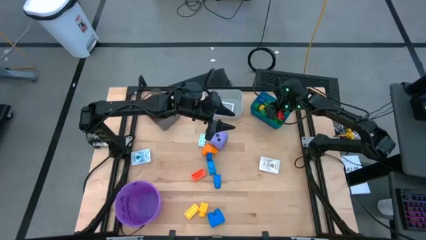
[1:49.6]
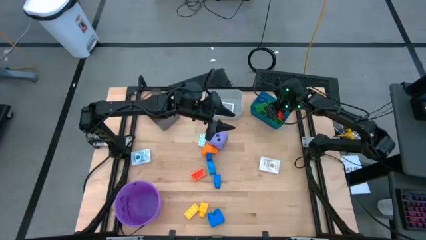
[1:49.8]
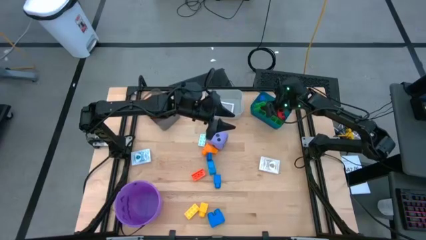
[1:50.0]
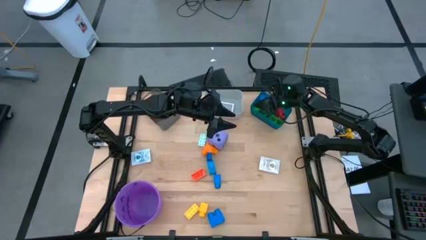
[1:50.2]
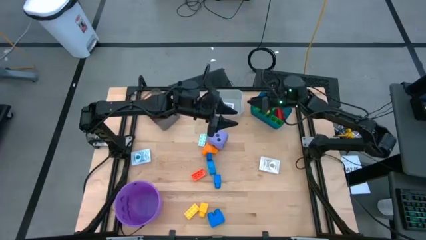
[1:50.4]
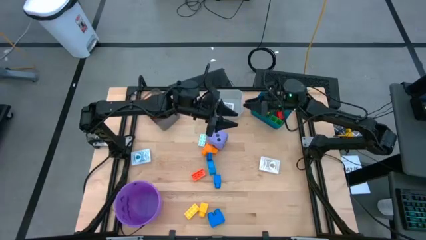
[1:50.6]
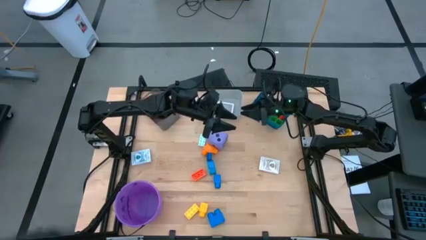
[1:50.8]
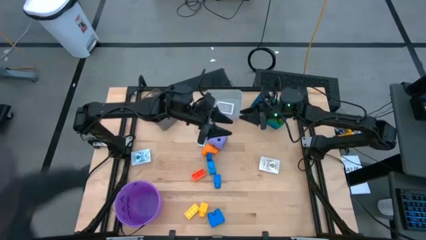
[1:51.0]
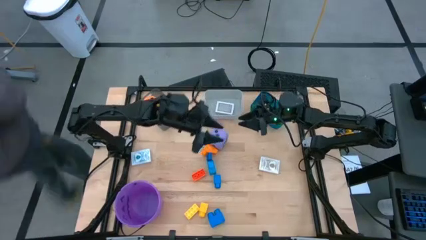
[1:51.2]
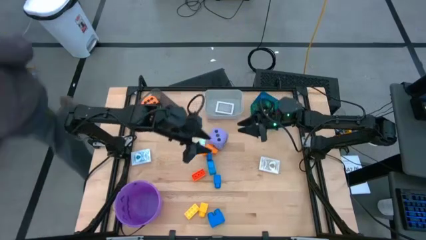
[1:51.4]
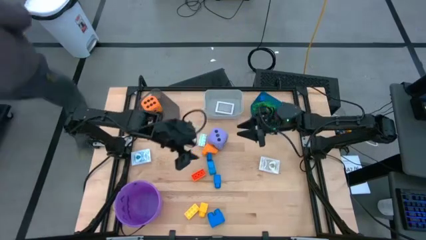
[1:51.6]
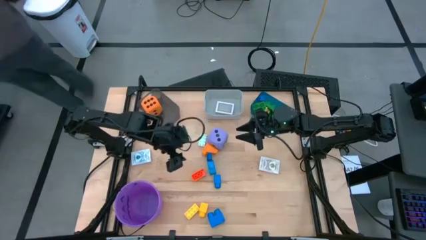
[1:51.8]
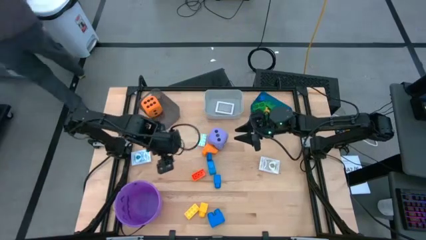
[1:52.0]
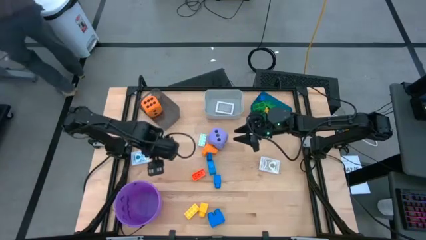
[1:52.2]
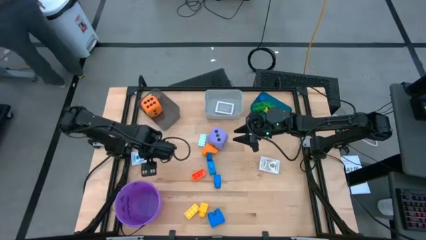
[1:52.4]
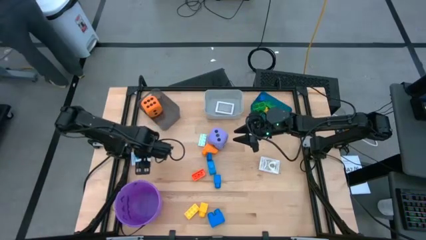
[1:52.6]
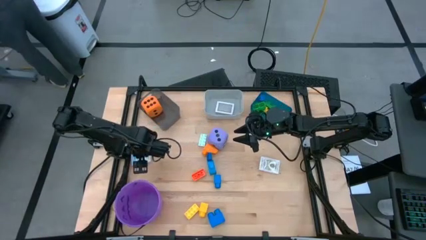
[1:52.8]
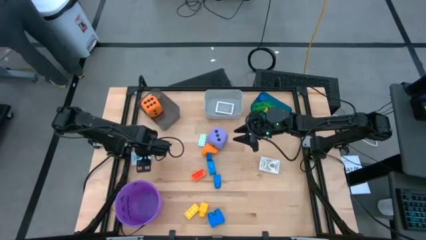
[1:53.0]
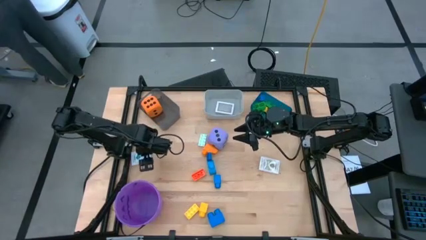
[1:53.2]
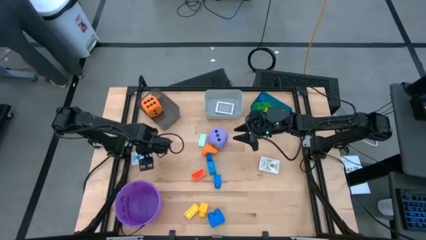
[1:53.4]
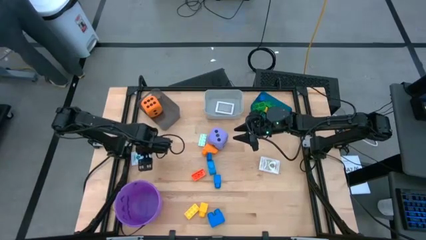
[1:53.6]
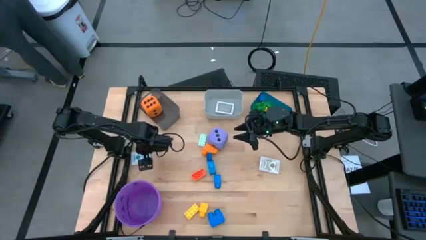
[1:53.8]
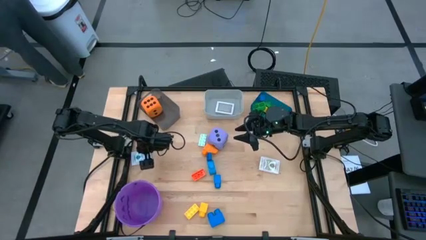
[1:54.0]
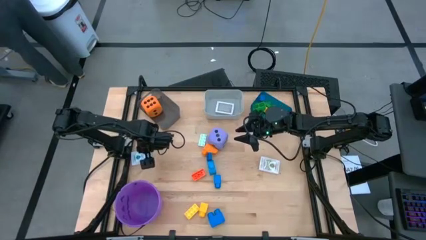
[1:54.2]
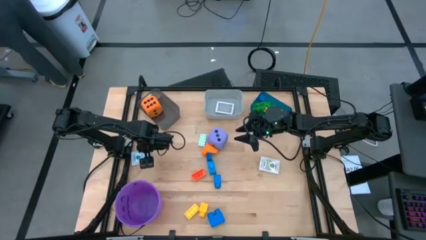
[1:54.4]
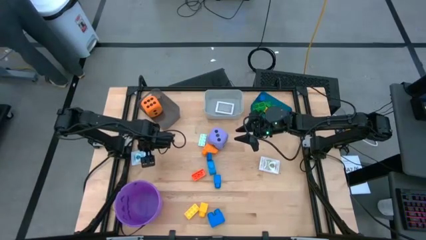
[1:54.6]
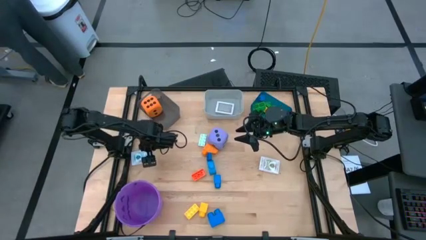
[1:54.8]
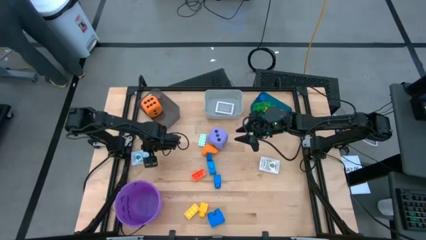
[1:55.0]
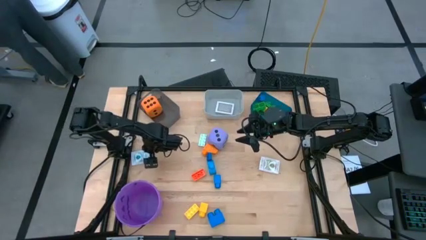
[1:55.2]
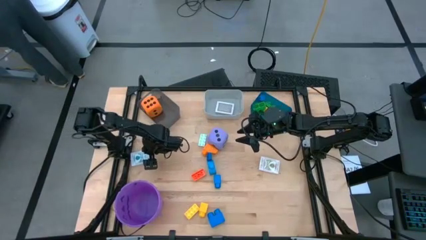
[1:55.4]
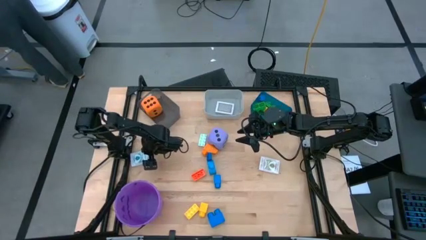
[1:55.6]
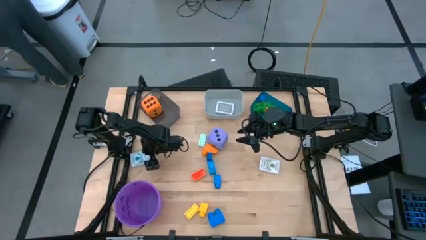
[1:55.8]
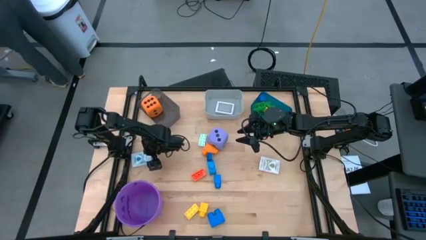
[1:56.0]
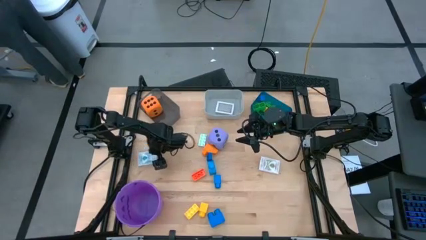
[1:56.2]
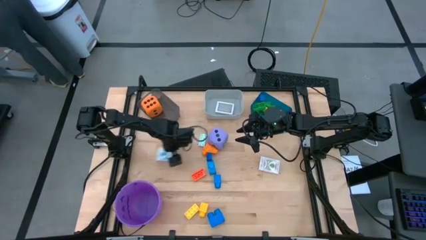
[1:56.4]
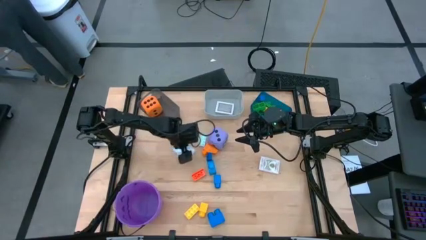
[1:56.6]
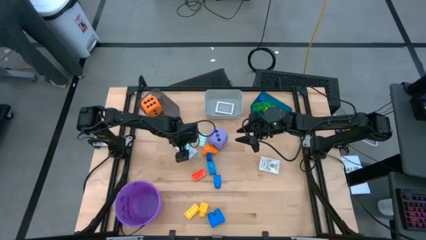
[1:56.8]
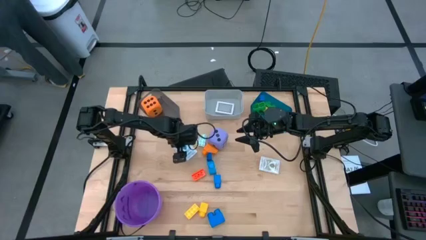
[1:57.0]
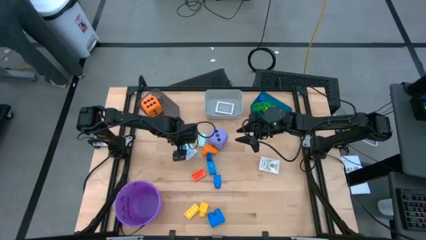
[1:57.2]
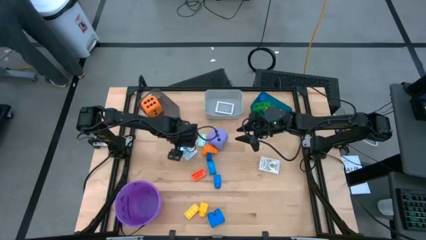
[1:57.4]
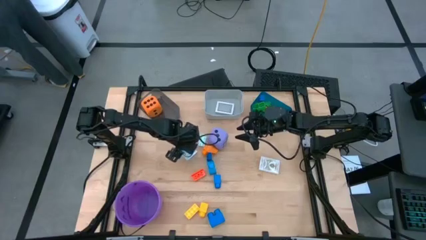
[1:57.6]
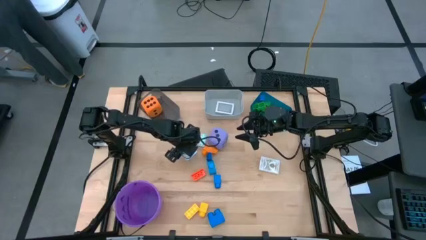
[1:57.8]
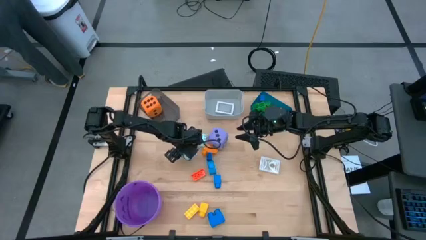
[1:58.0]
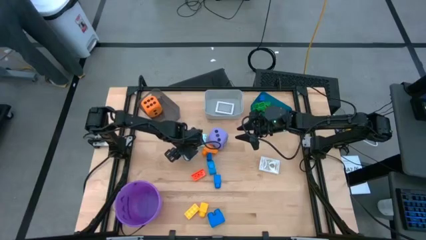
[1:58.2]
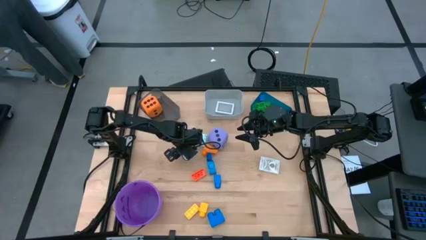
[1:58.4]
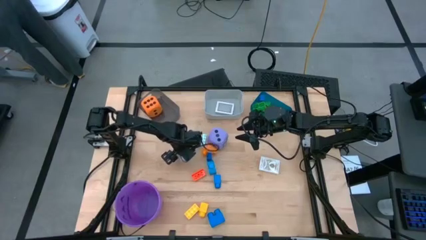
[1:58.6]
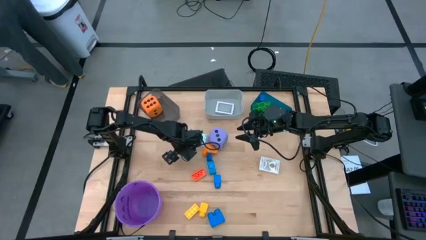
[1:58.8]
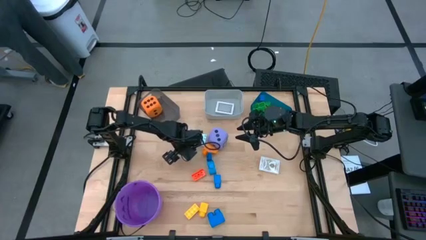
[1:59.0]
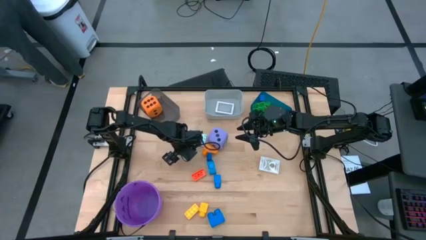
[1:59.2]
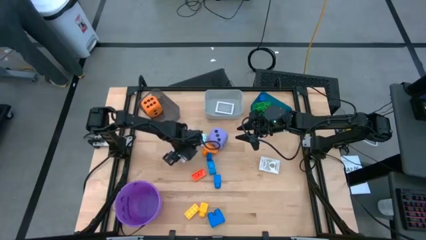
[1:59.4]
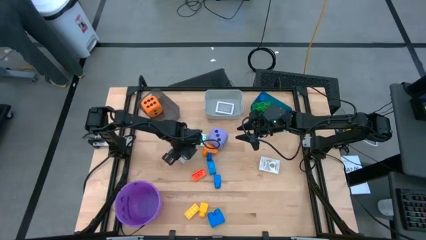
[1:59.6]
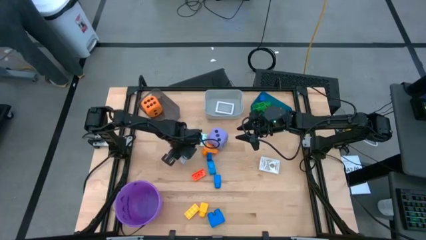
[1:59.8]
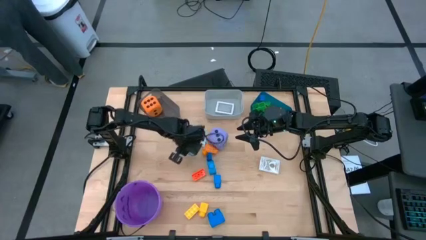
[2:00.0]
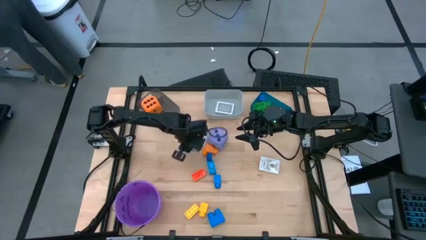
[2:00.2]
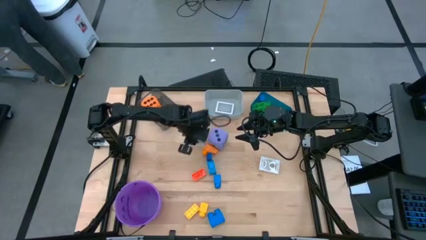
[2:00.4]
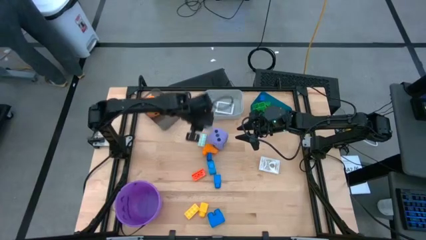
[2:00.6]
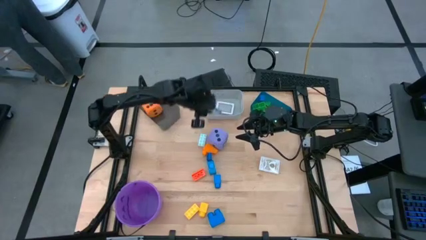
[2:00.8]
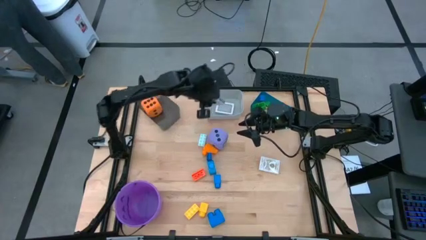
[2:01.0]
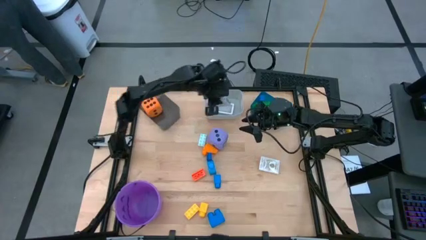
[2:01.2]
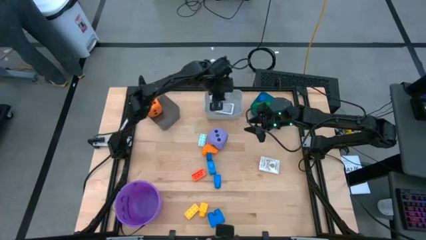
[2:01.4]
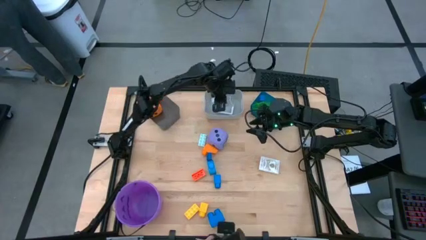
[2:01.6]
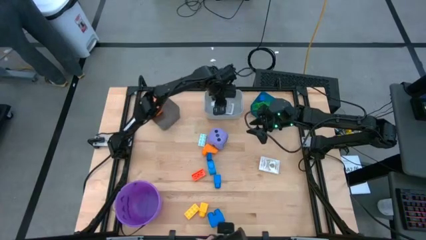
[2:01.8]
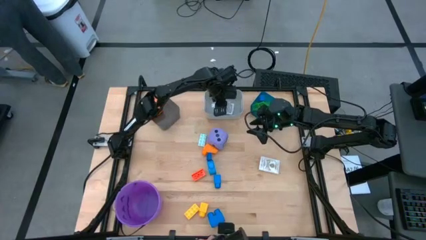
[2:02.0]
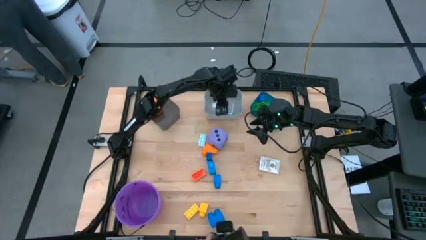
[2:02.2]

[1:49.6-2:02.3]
Task: Pick & Place Toys
Put the blue deck of cards into the gray bin
